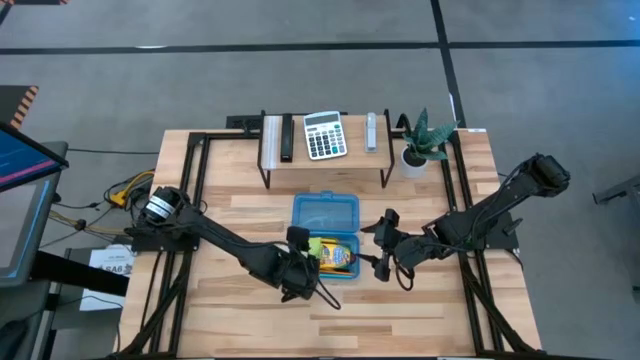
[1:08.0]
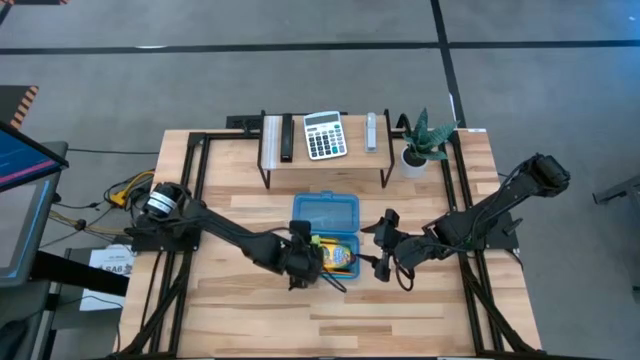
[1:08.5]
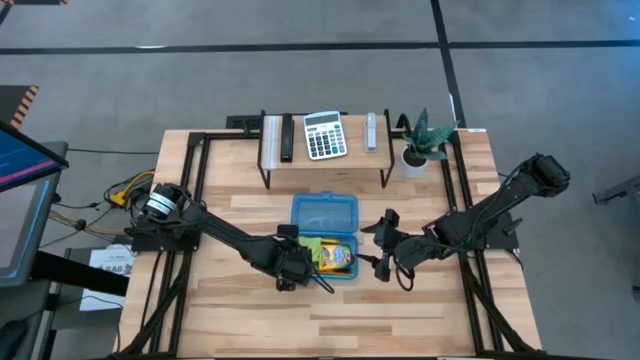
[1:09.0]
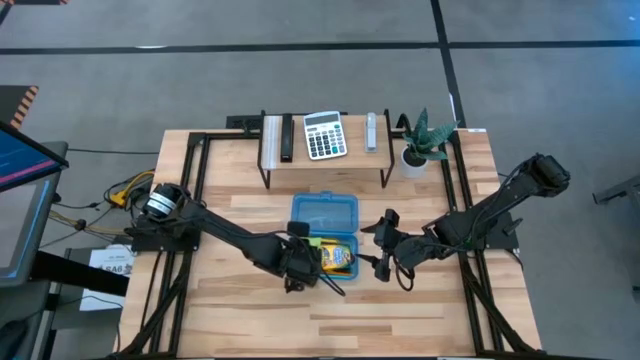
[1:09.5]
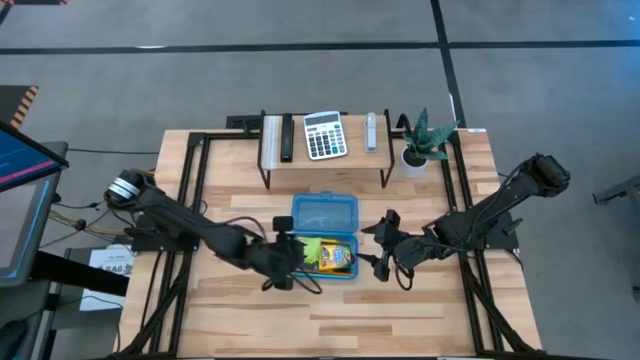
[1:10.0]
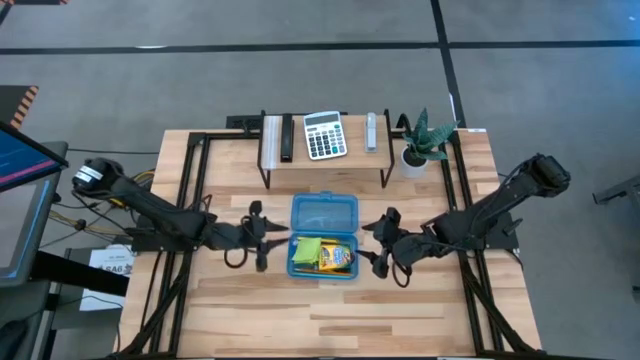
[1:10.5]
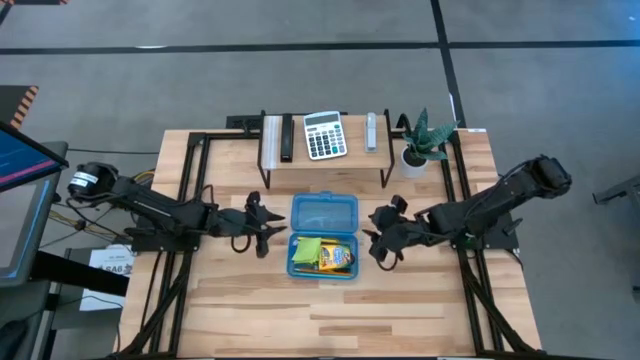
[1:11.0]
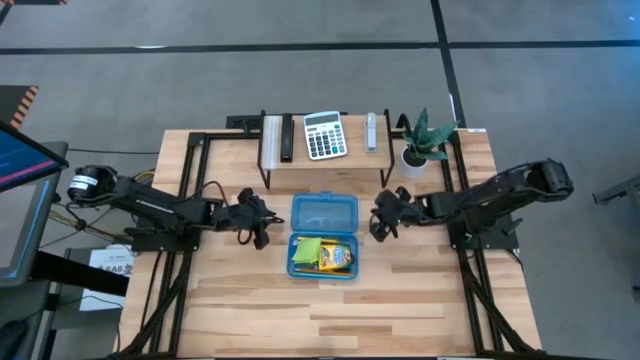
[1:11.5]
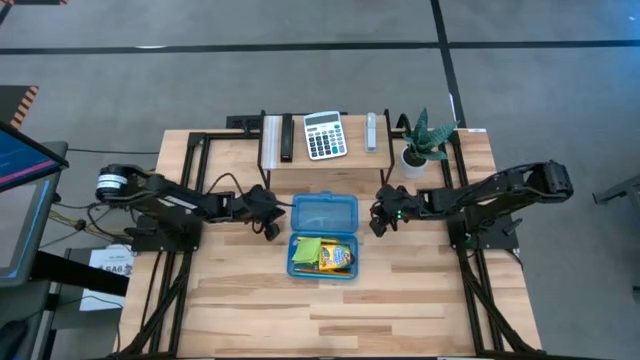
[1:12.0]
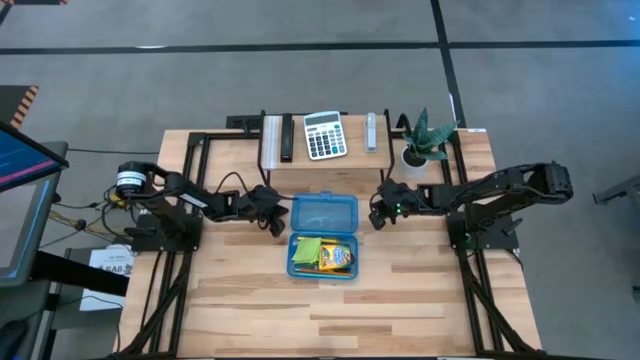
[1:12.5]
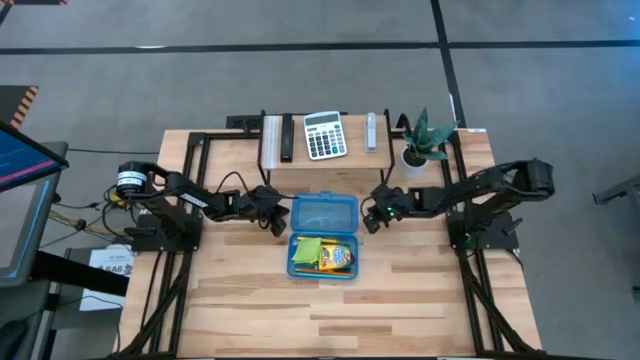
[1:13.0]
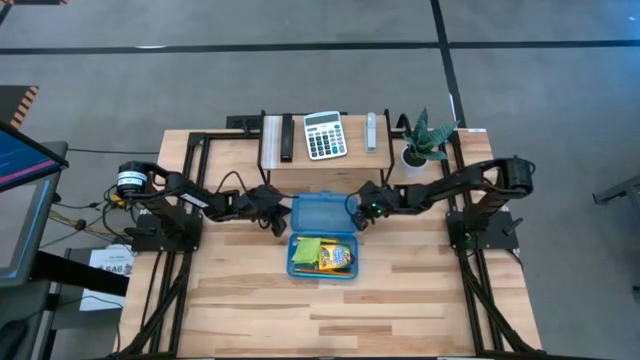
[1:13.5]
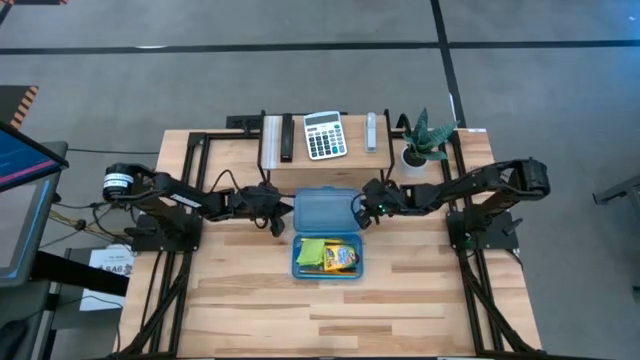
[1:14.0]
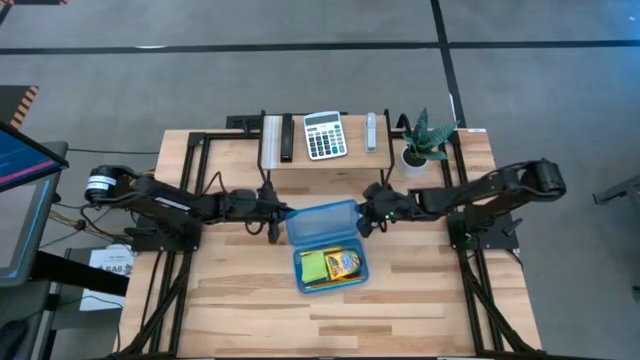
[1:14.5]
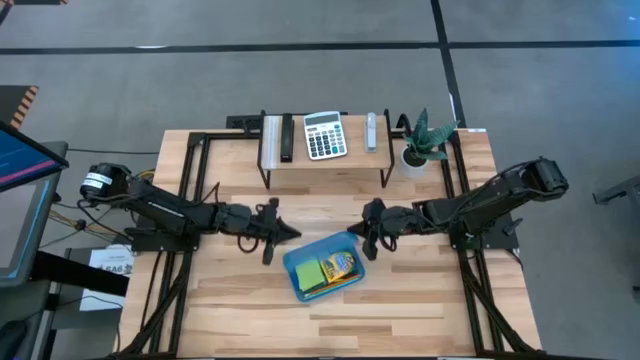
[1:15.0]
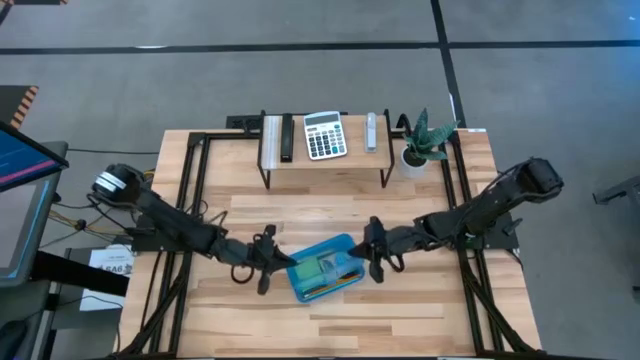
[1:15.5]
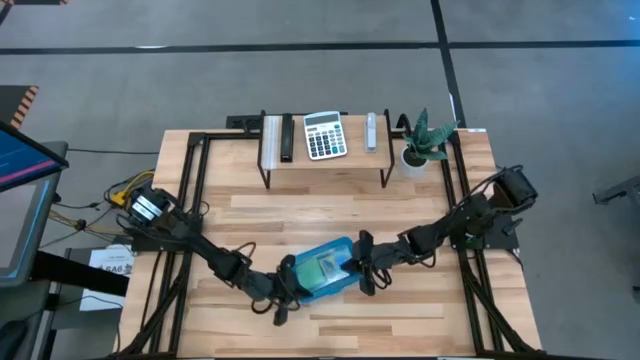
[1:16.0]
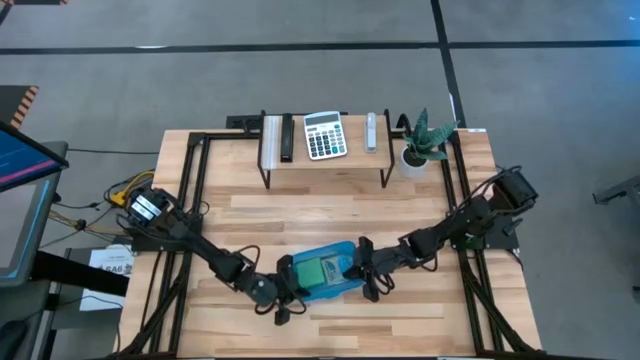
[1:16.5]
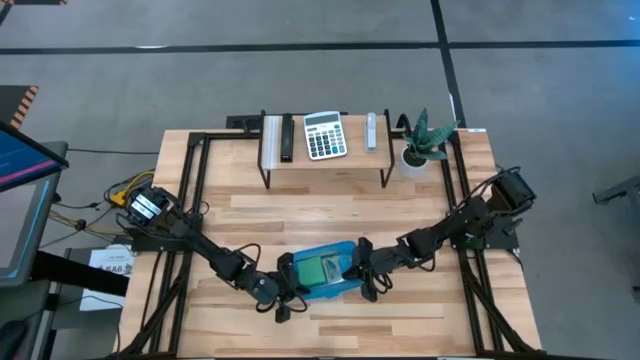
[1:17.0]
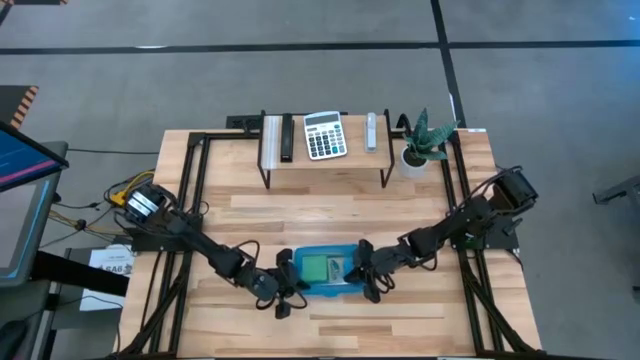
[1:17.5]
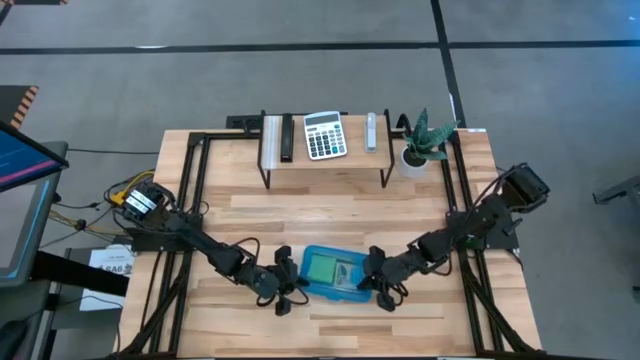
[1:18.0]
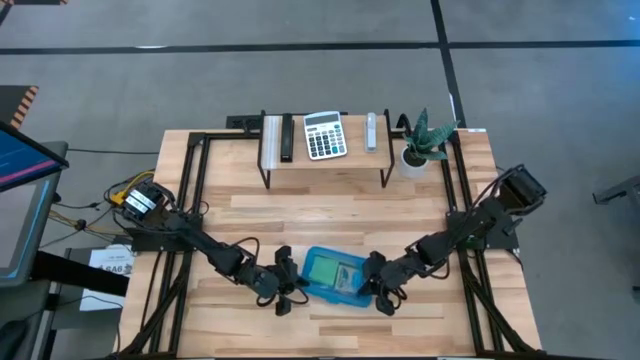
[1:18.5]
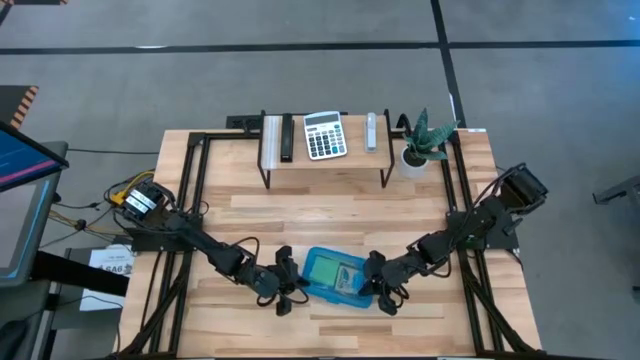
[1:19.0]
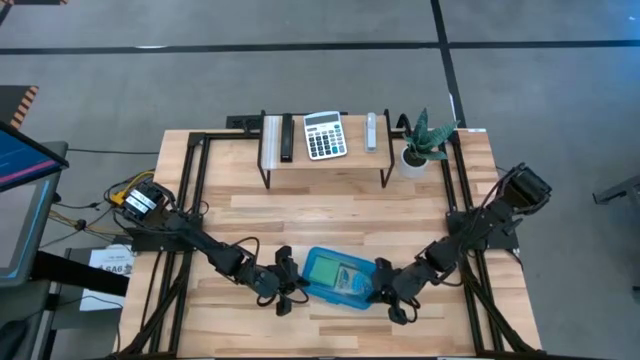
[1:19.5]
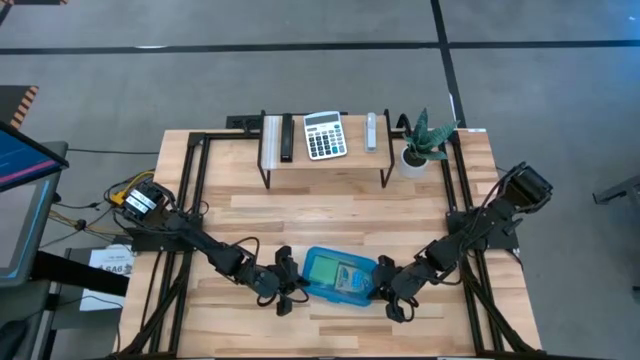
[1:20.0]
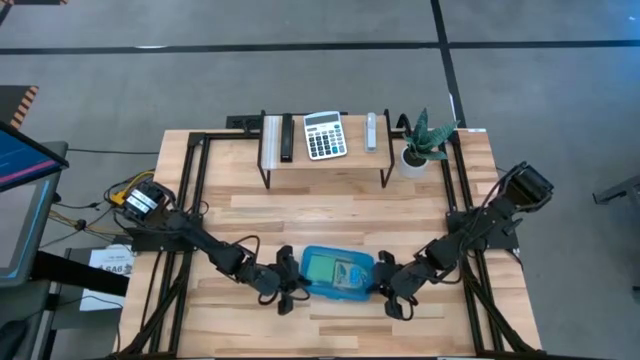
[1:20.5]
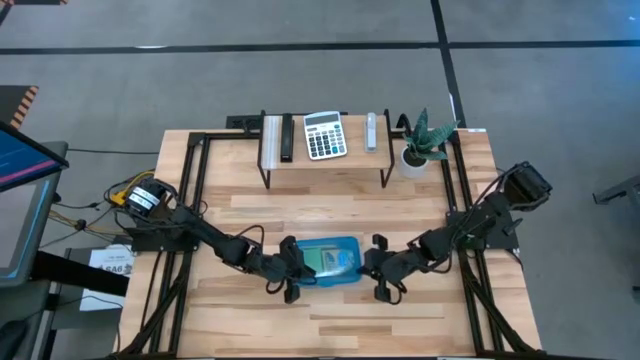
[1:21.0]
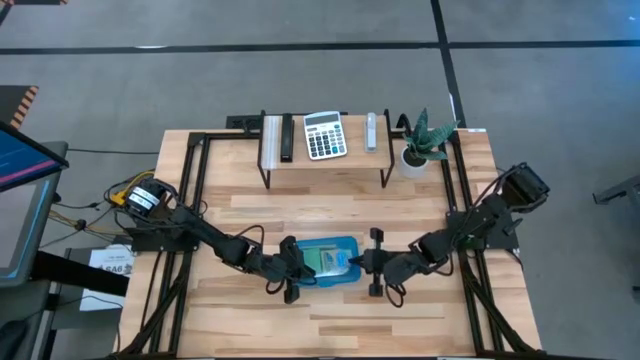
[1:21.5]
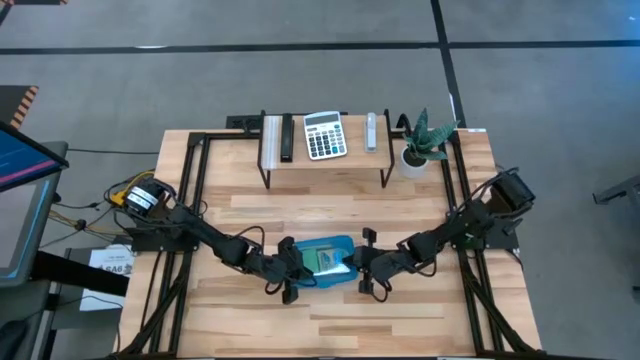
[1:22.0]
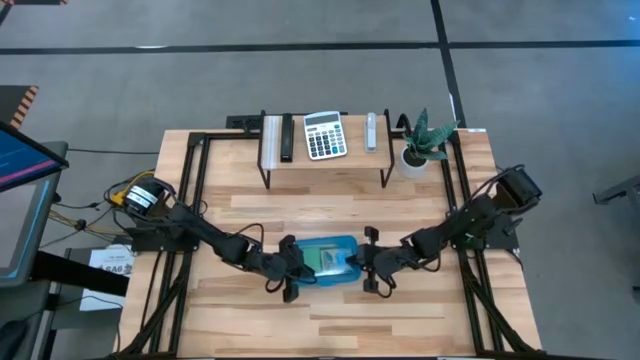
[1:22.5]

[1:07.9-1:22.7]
Task: Pack school essentials
Close the blue supply box

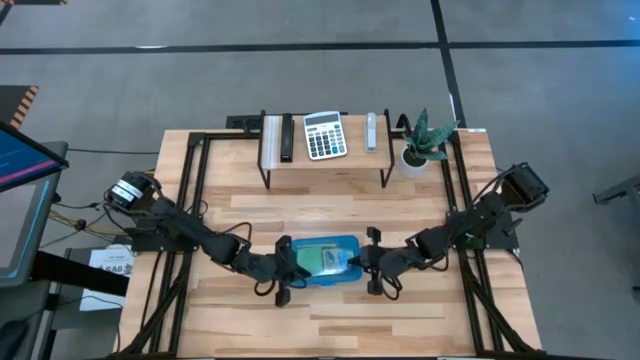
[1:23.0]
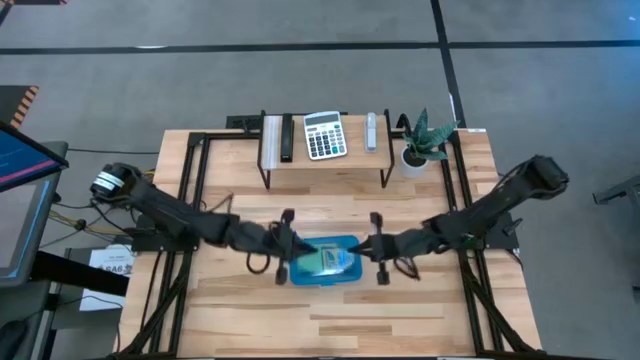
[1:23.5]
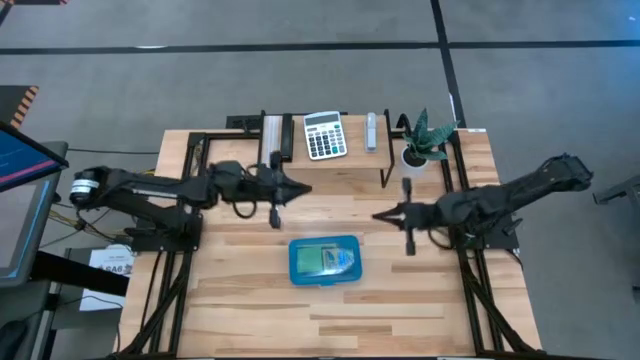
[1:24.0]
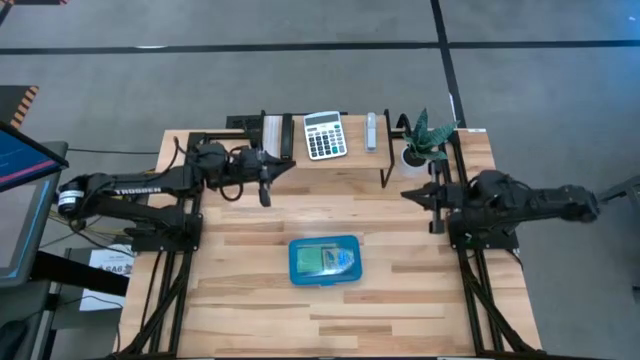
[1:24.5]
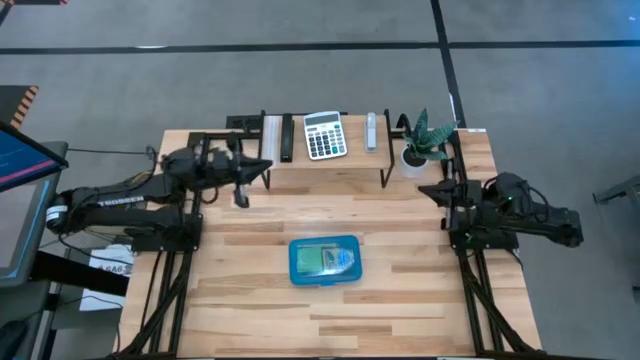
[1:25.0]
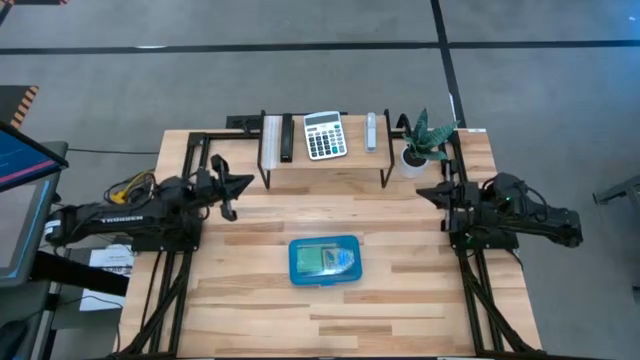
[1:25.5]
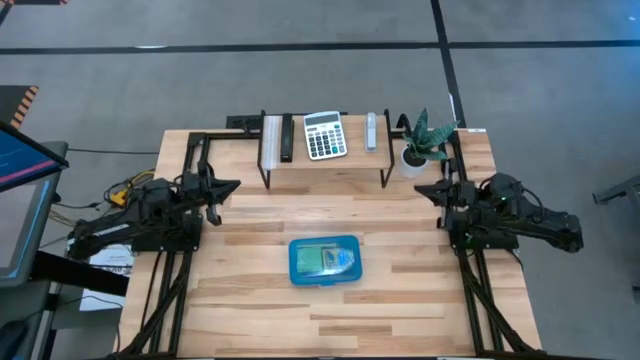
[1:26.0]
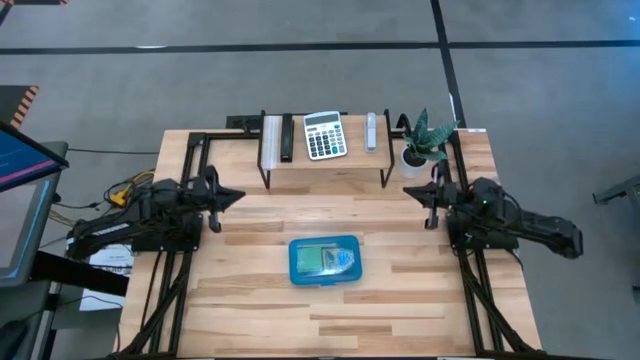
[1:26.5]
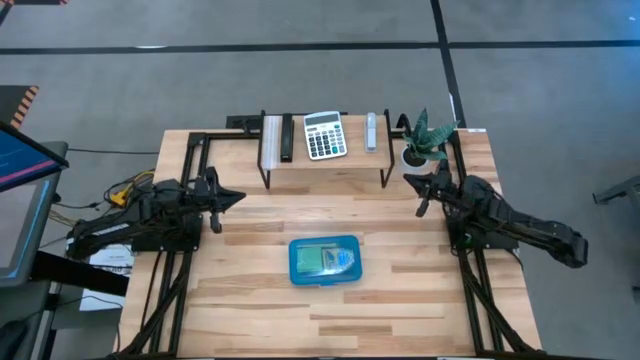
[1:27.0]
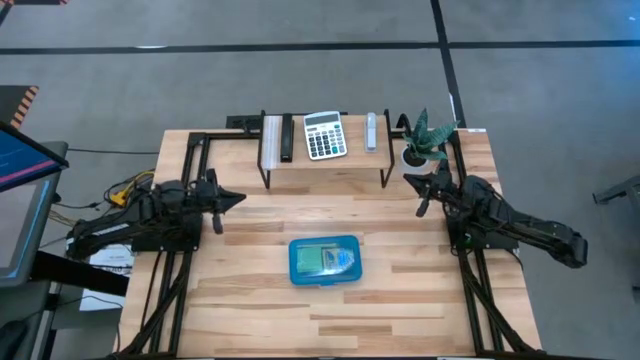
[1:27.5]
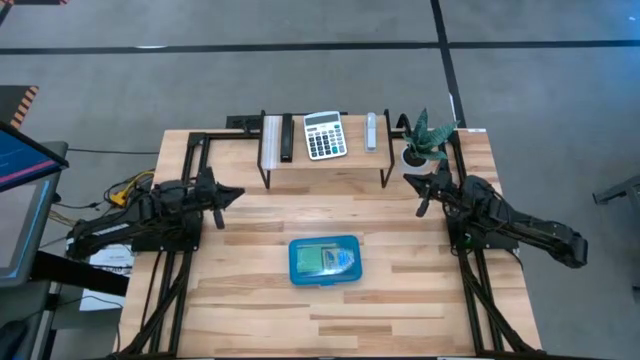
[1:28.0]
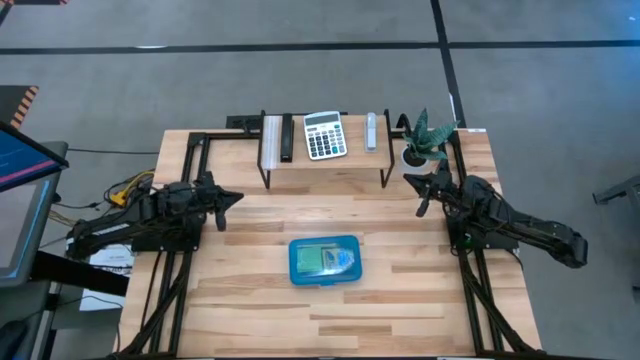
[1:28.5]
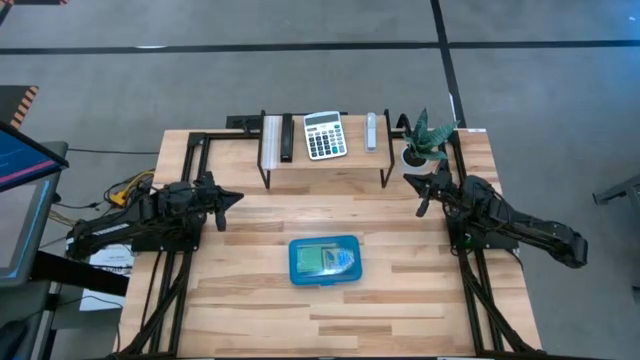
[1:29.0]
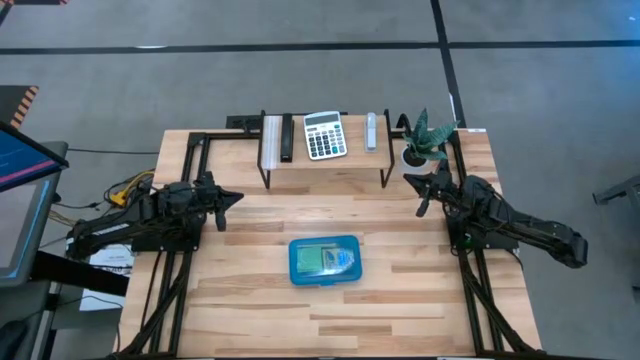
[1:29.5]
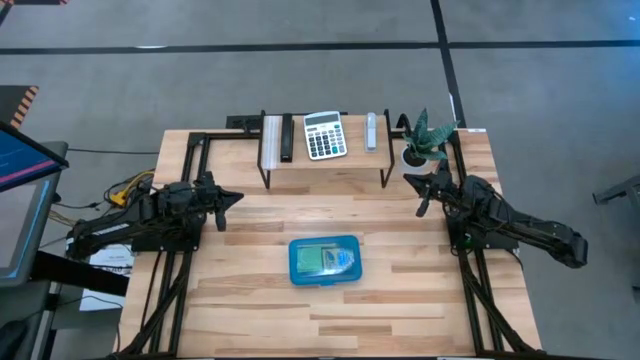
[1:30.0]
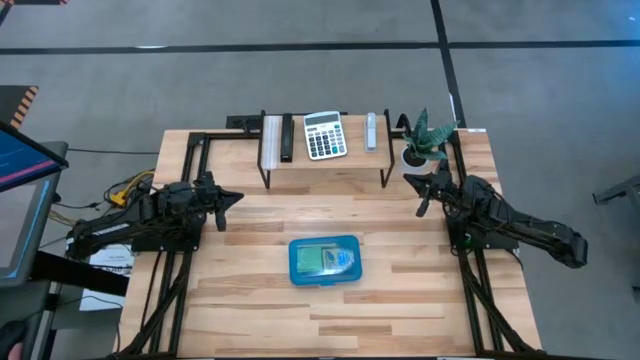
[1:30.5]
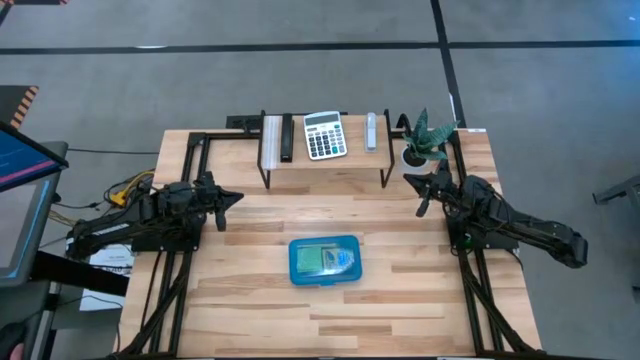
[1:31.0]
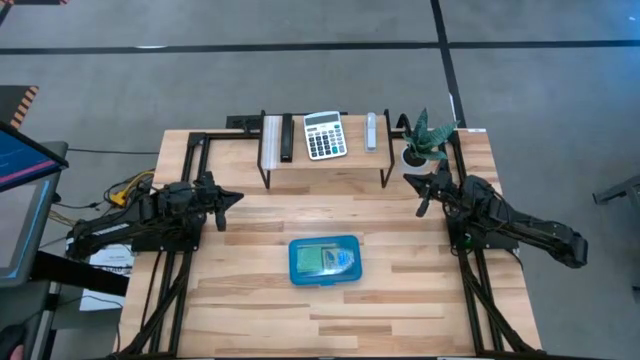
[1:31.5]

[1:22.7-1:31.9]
Return to Home Position
